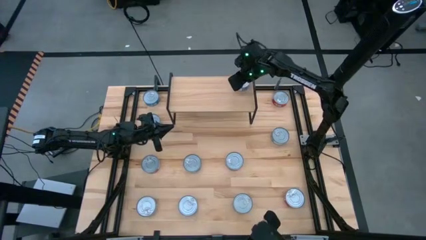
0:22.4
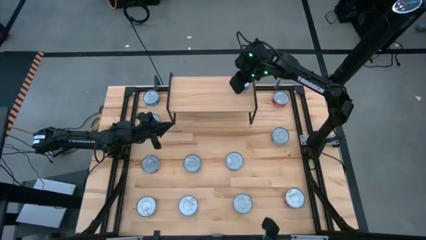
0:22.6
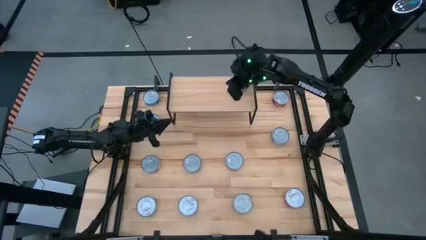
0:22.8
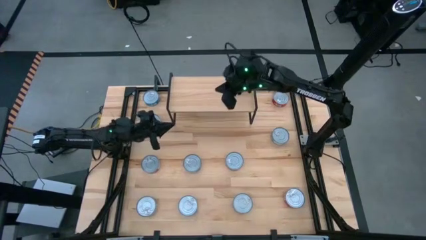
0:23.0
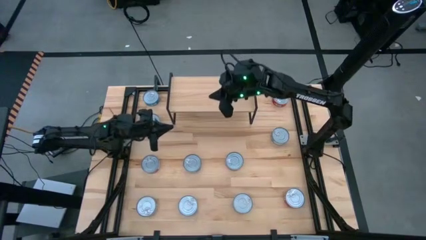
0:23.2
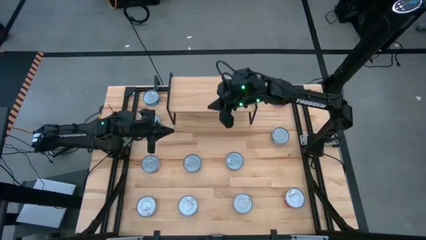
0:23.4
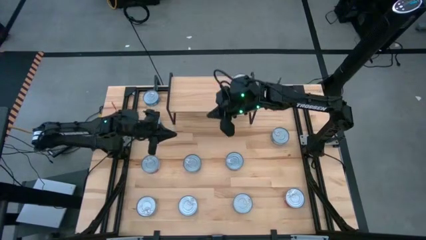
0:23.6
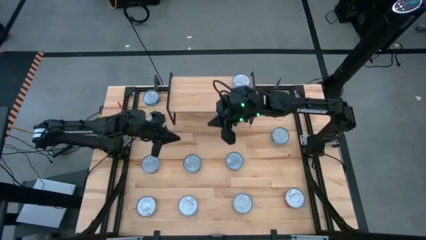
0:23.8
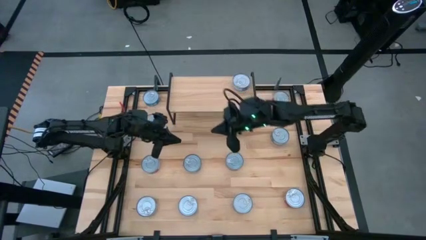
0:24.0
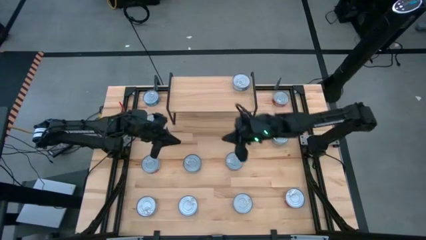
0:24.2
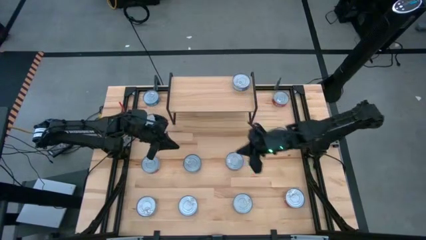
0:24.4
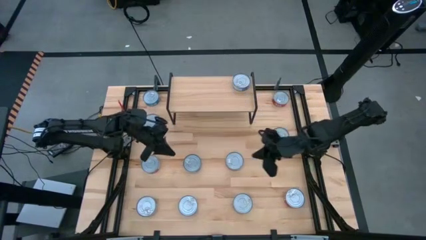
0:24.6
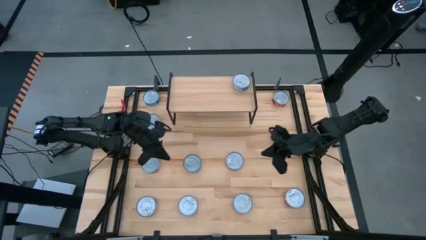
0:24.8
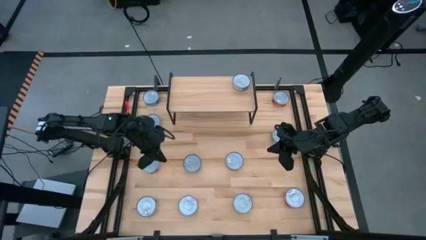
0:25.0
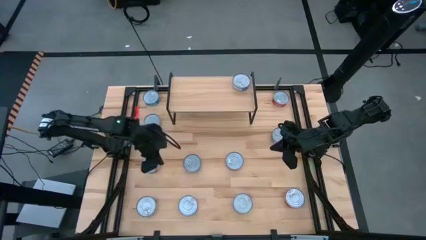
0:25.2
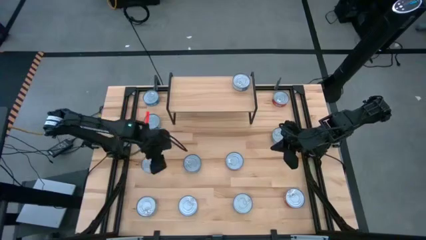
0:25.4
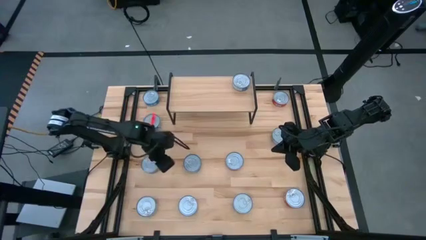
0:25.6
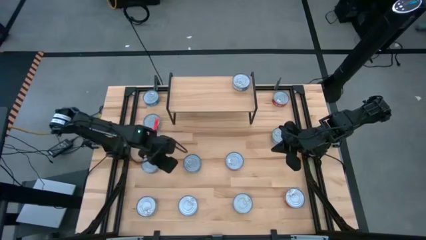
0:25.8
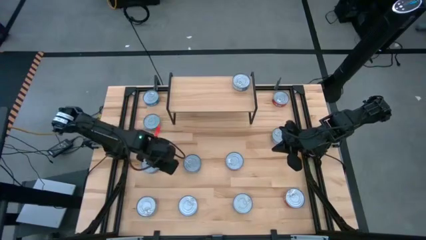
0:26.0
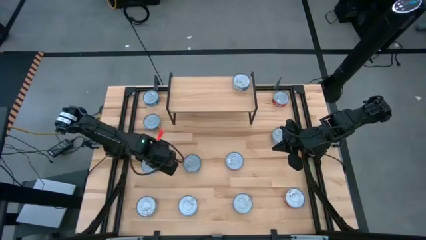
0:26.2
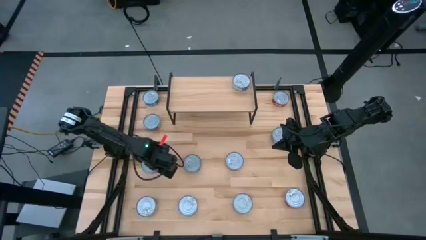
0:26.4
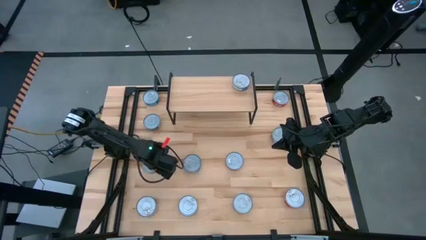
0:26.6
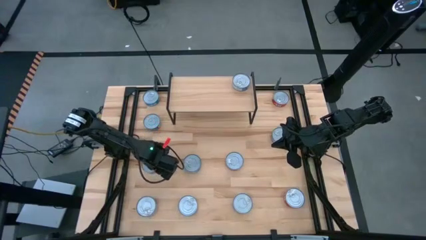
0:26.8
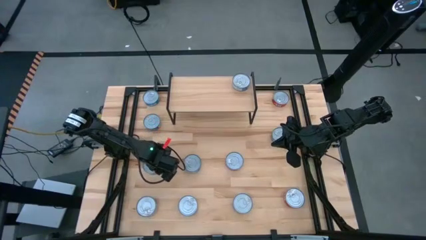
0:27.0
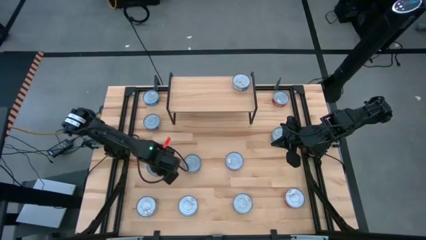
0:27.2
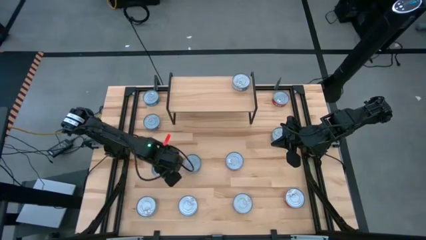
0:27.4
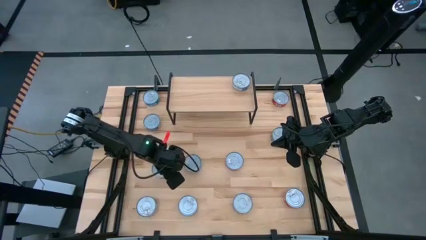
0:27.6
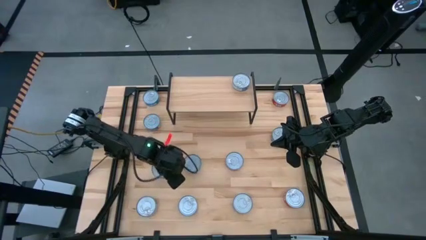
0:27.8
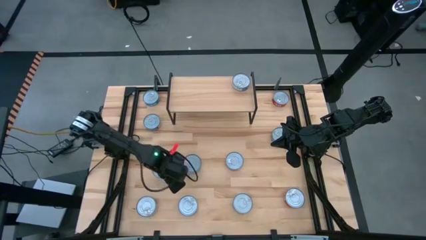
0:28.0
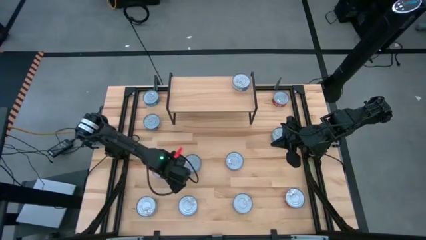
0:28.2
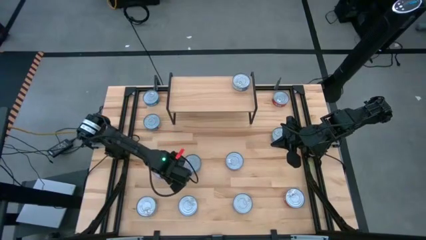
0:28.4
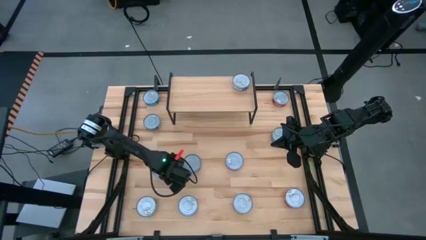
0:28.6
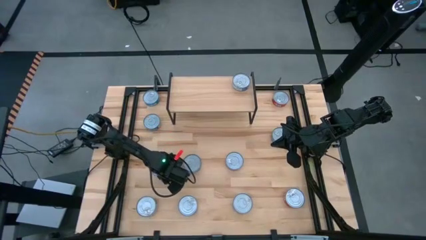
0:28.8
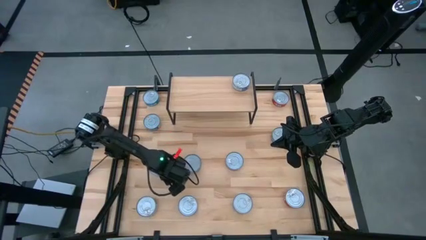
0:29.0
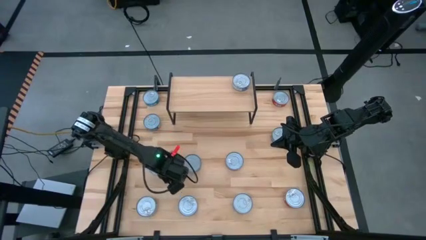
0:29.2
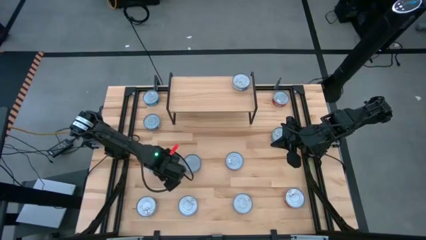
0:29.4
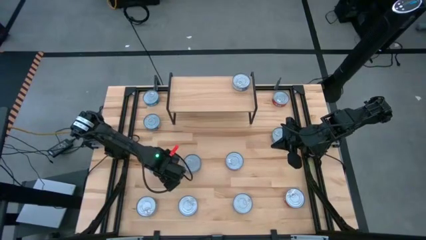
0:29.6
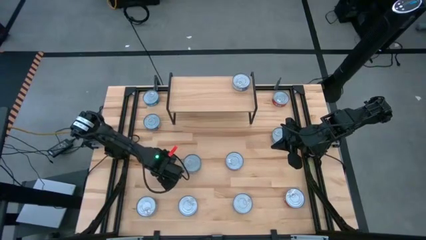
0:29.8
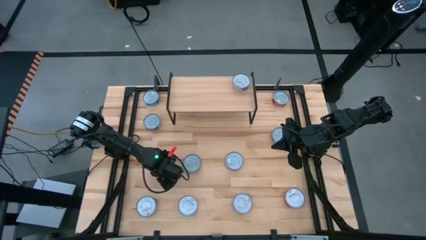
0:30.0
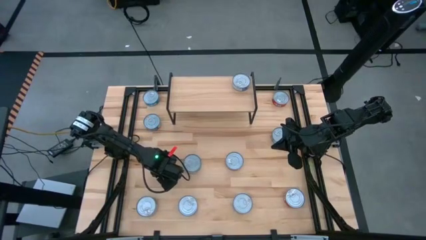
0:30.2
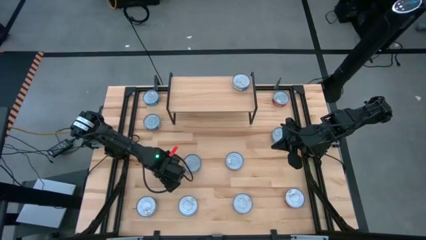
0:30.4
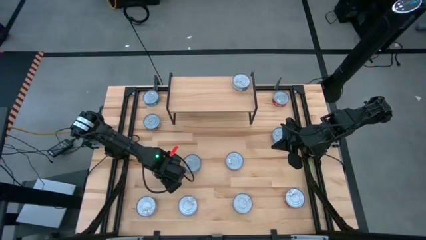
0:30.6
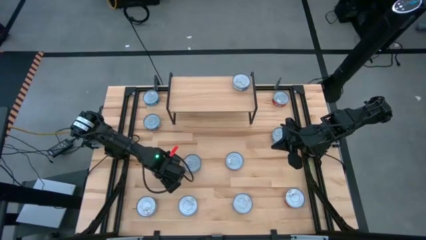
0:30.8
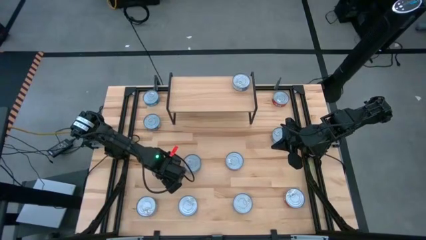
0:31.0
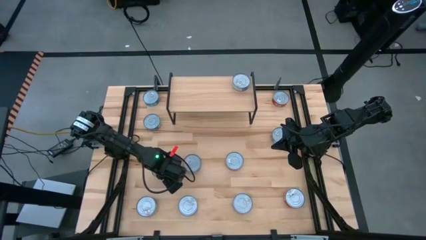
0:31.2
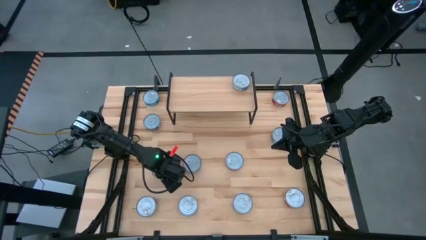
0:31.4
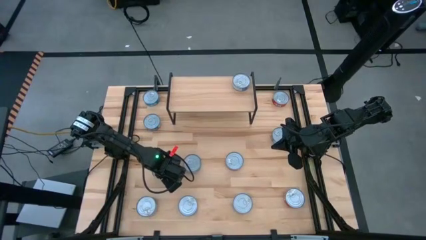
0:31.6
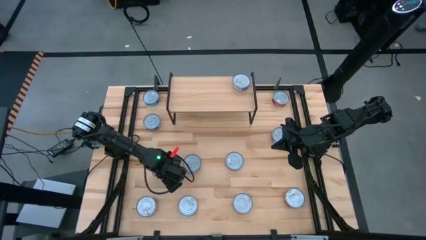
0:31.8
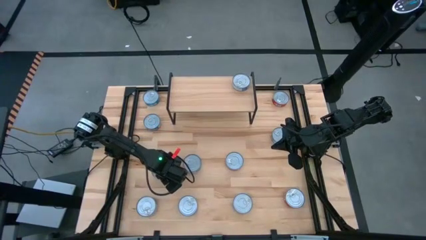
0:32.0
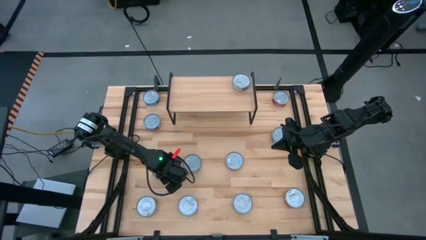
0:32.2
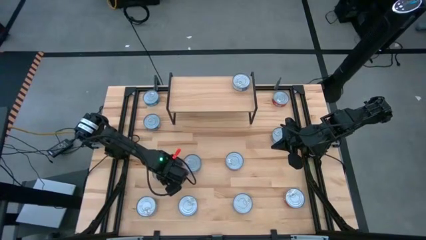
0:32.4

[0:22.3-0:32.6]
Task: Stack canned seafood by type on shelf
Put the middle left red tuna can on the shelf

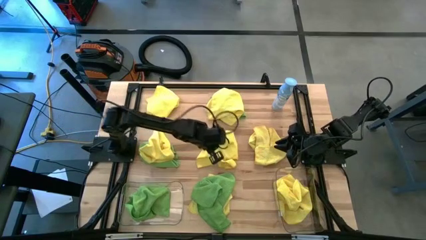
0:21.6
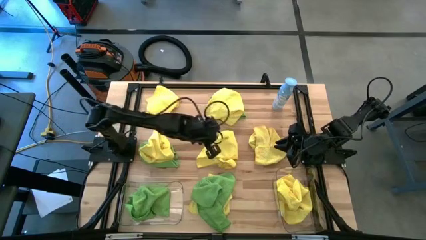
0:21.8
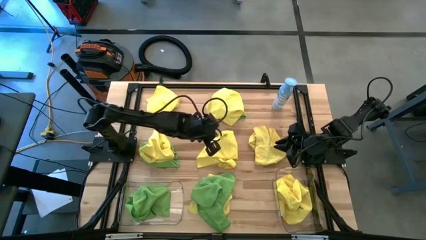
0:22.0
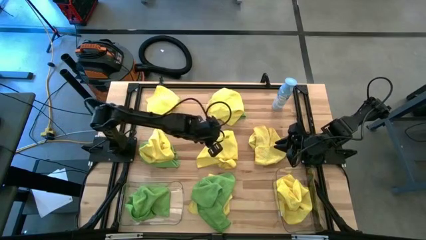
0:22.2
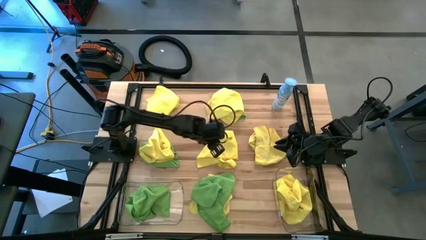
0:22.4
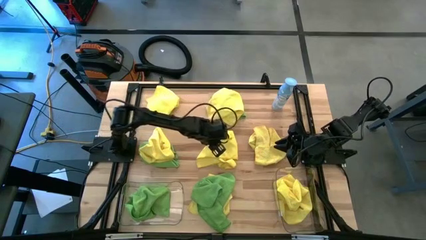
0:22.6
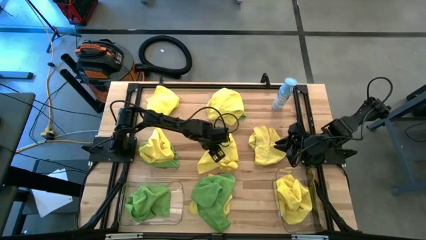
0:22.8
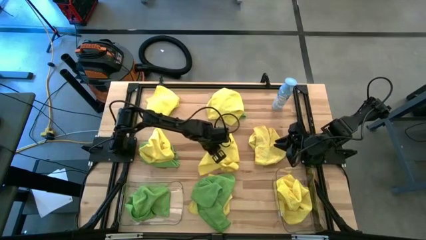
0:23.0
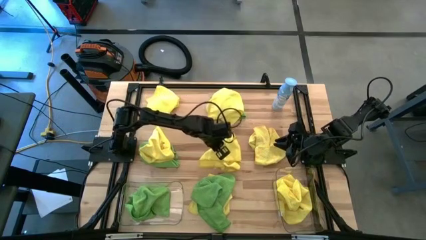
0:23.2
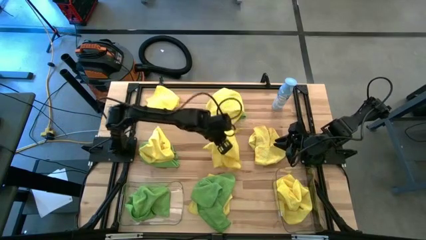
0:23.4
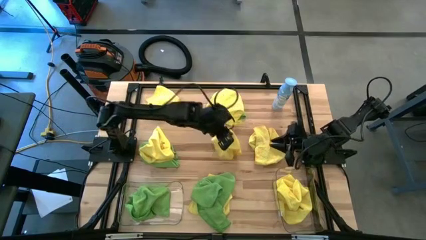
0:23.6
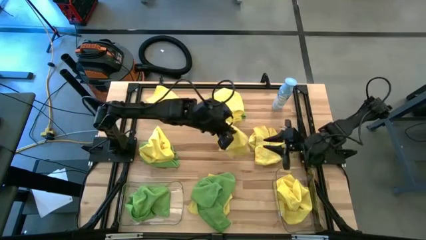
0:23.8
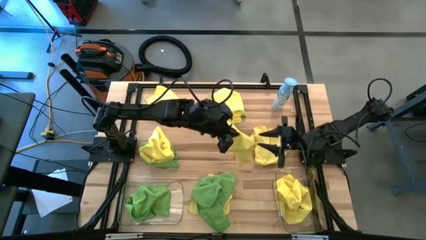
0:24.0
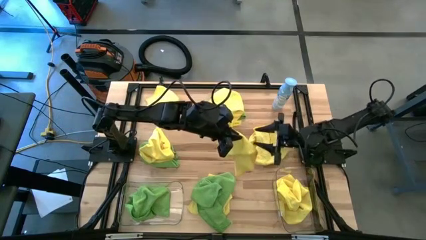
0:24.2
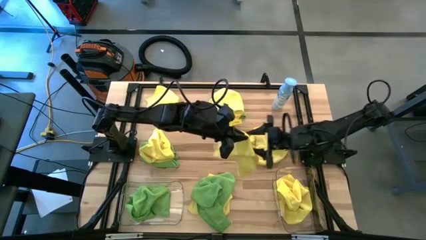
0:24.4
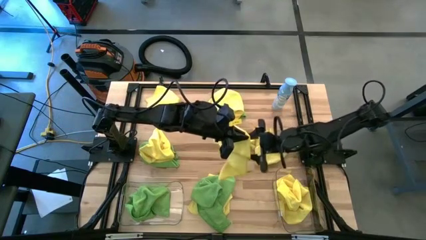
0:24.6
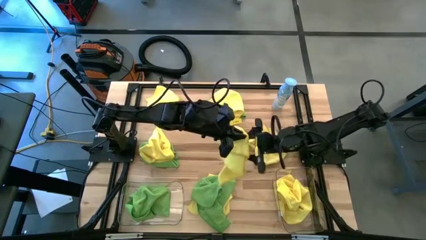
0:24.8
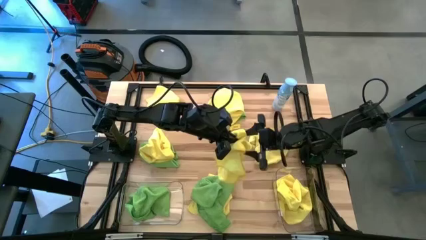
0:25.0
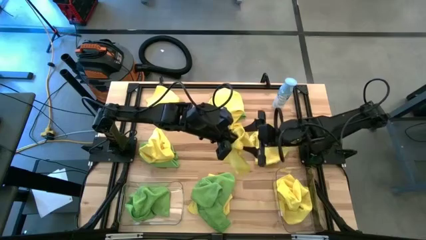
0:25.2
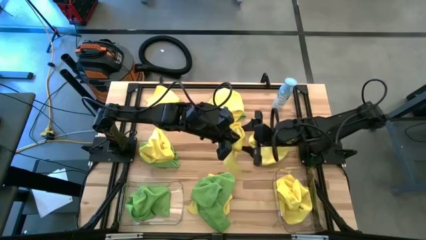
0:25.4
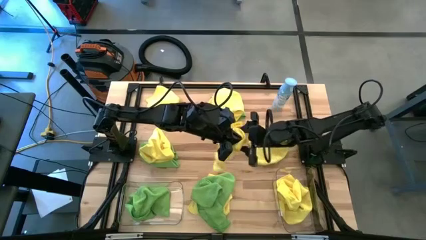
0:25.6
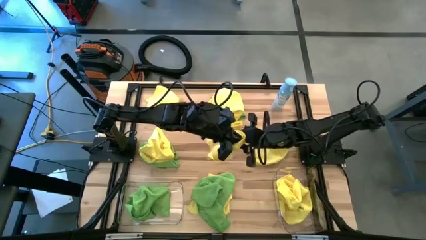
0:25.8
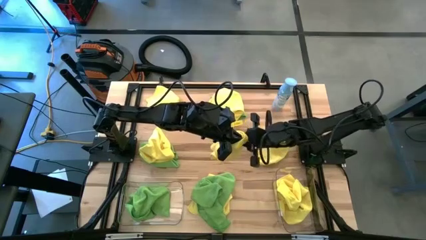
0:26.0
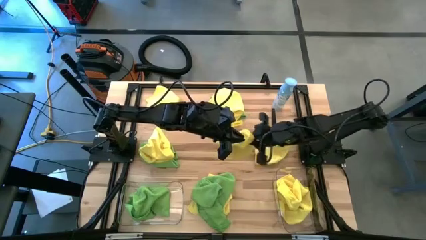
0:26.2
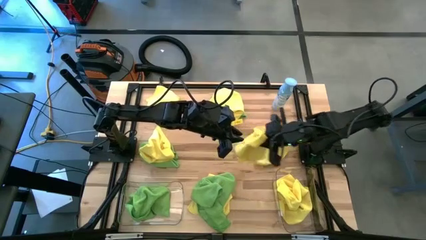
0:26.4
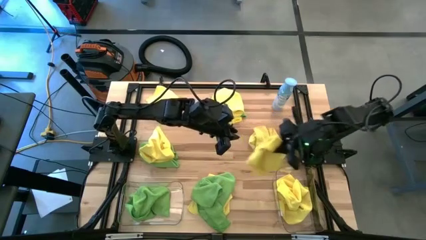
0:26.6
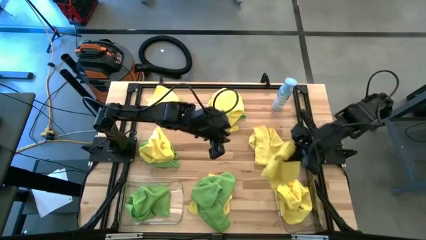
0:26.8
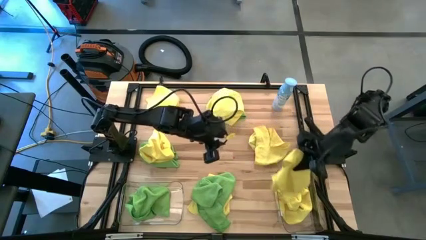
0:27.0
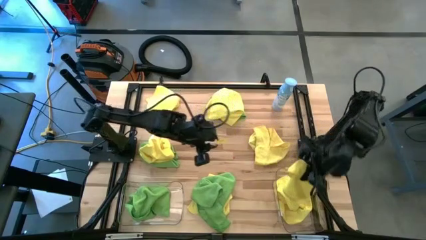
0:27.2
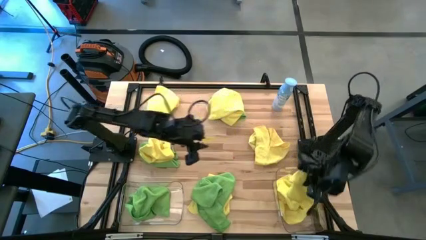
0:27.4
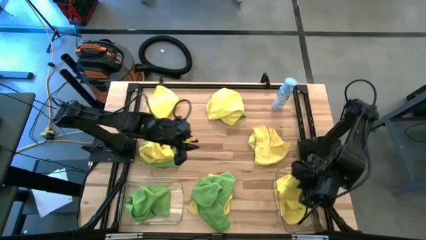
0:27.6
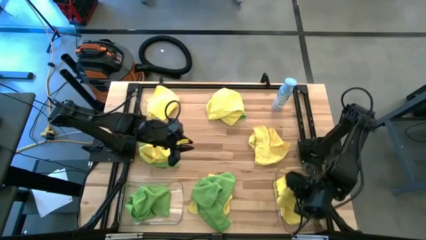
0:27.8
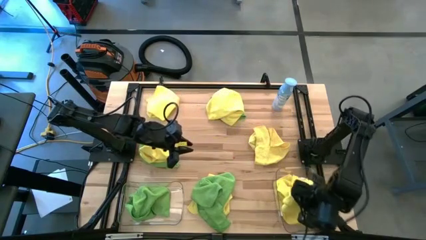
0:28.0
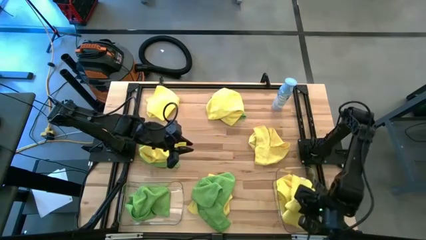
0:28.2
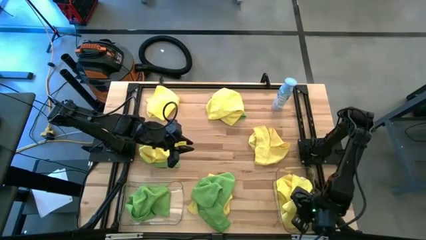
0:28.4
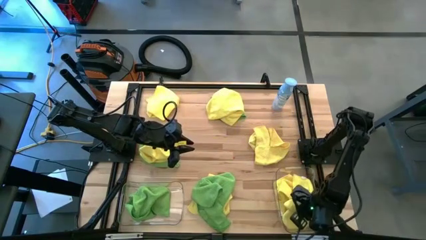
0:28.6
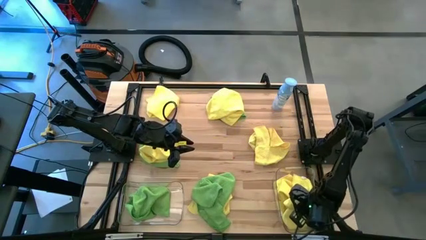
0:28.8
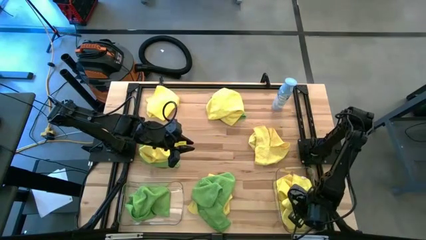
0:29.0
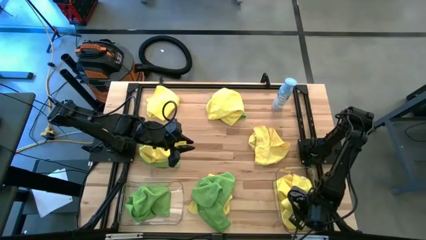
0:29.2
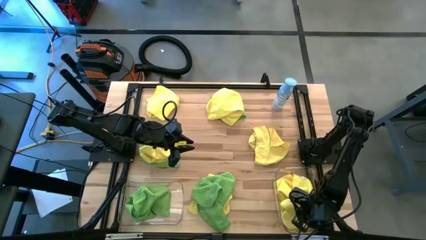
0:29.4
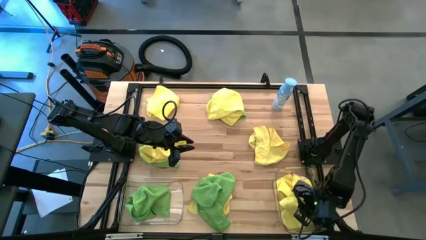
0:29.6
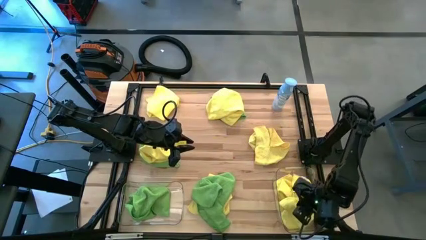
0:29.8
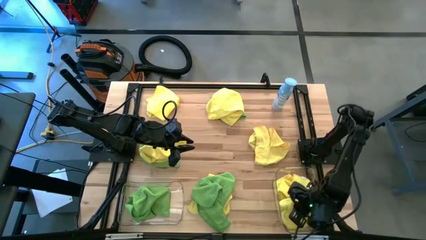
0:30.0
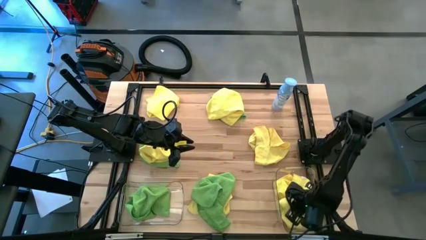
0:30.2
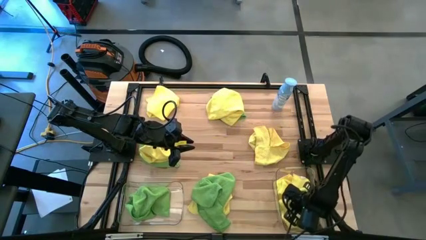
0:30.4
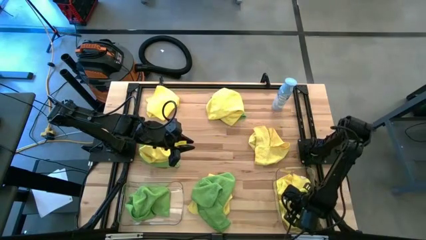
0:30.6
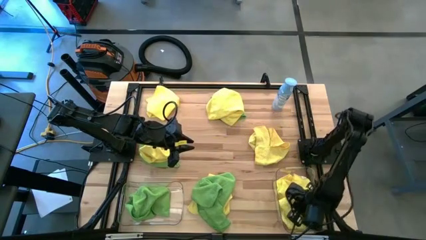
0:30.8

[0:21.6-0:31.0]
Task: Sort microfiber towel by color & place in baskets
Put the center yellow microfiber towel into the right transparent bin
